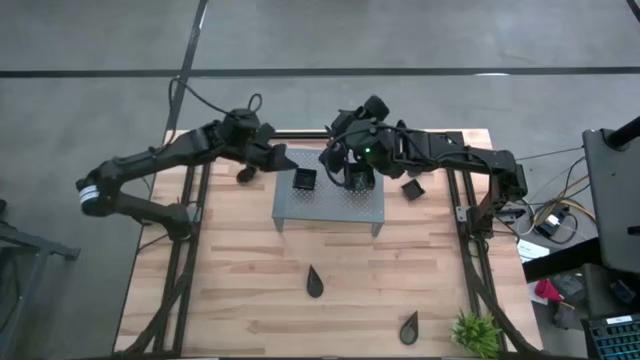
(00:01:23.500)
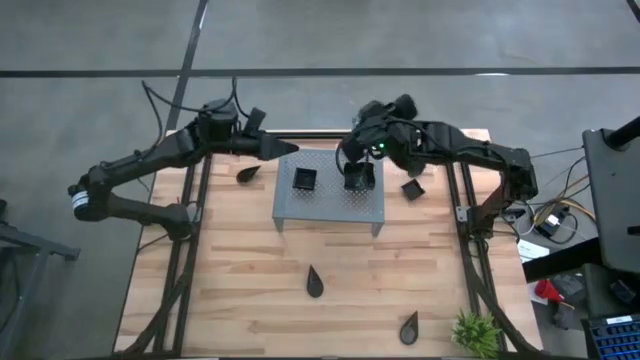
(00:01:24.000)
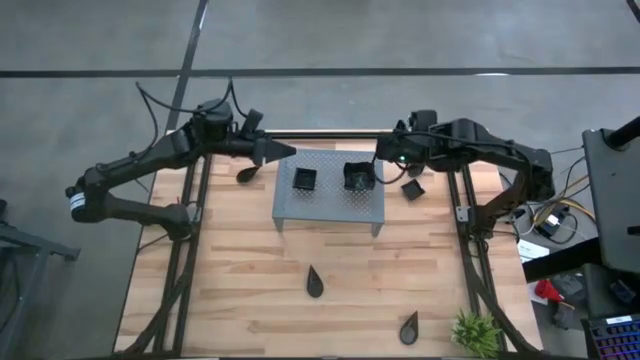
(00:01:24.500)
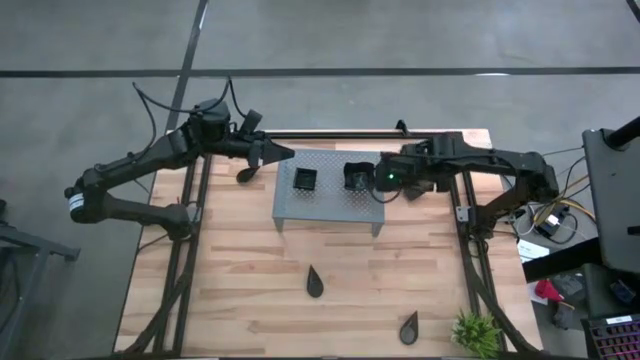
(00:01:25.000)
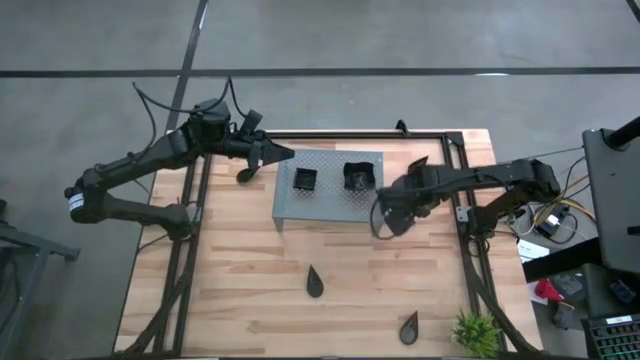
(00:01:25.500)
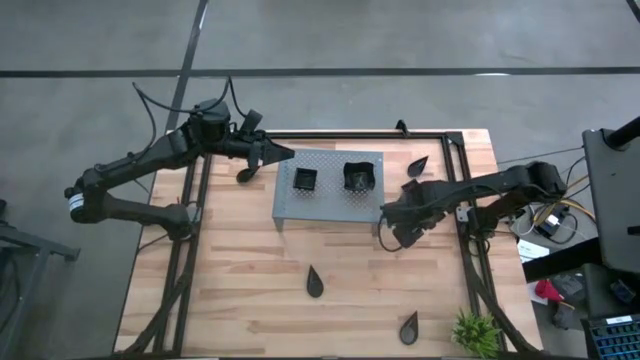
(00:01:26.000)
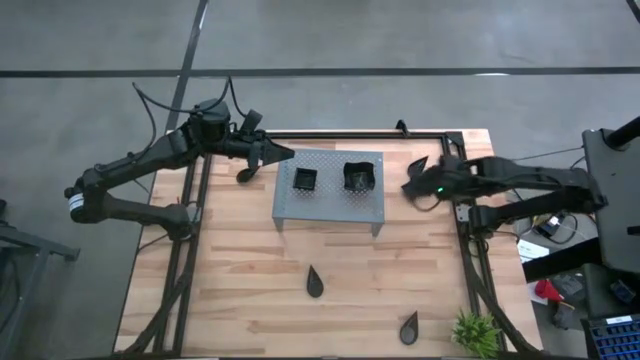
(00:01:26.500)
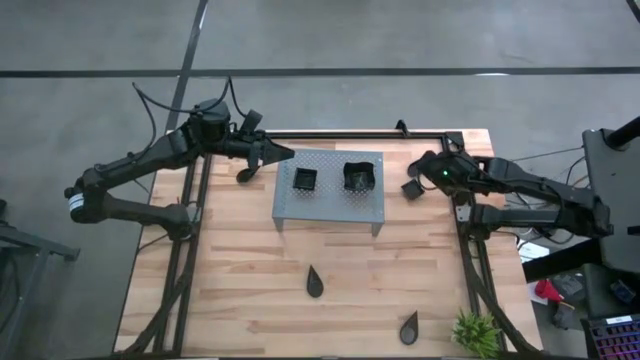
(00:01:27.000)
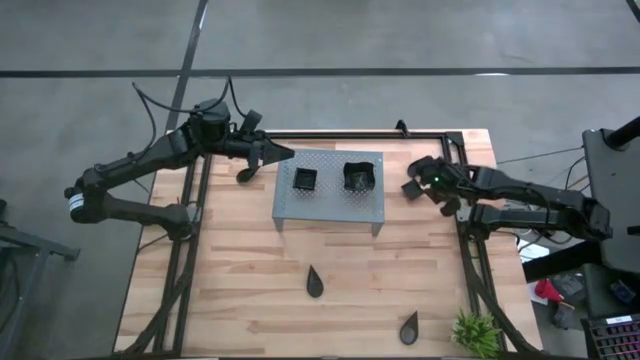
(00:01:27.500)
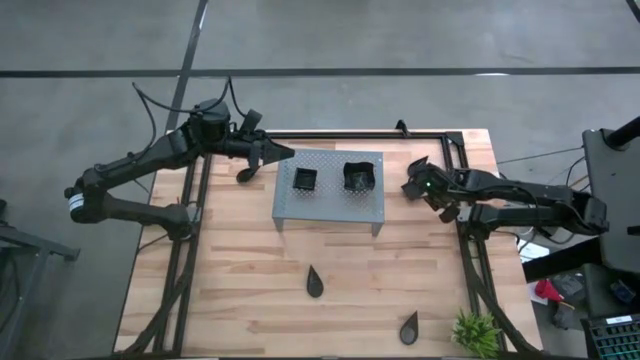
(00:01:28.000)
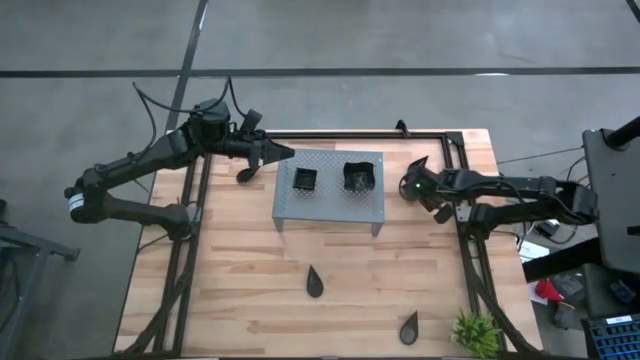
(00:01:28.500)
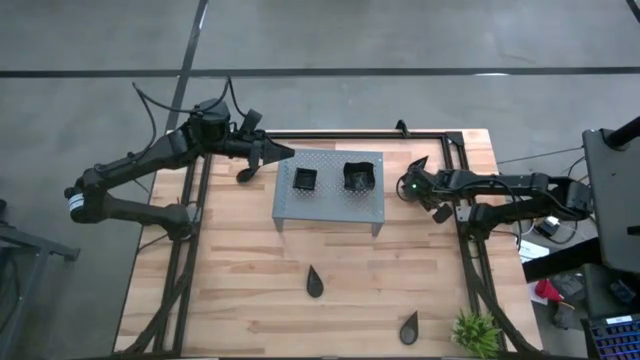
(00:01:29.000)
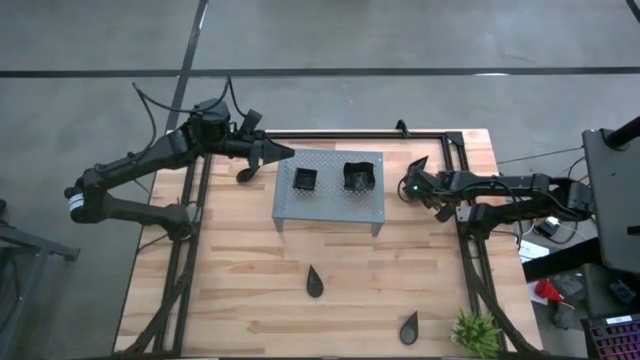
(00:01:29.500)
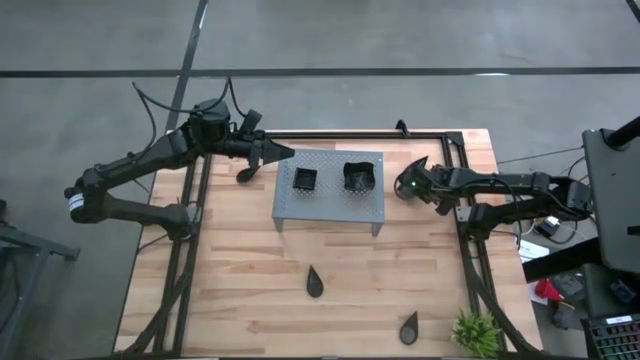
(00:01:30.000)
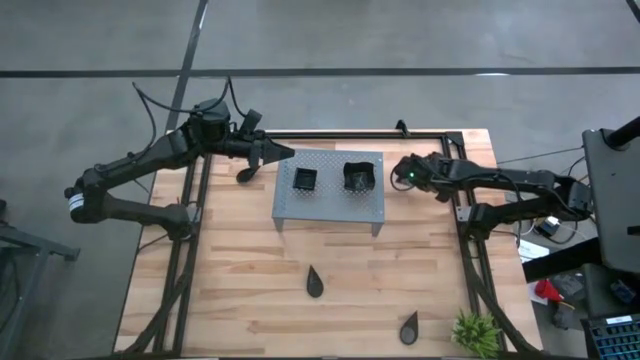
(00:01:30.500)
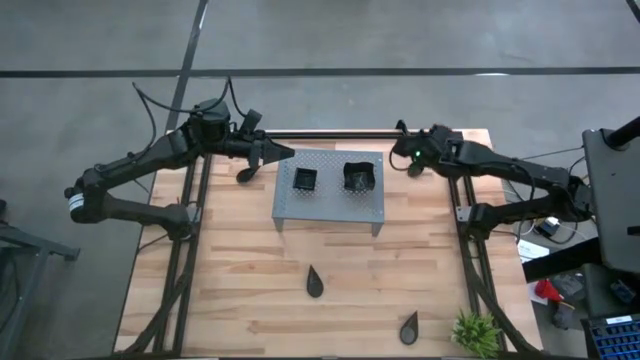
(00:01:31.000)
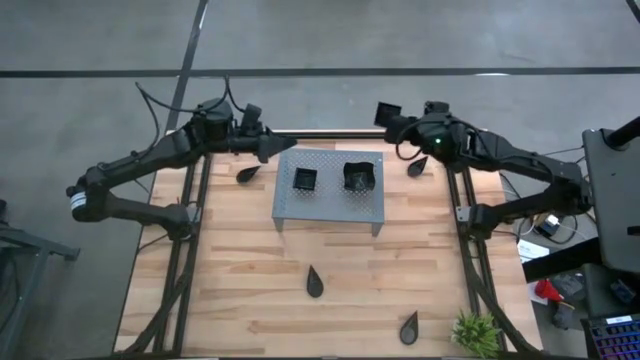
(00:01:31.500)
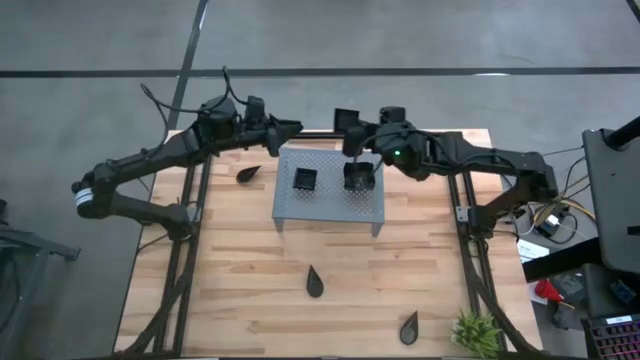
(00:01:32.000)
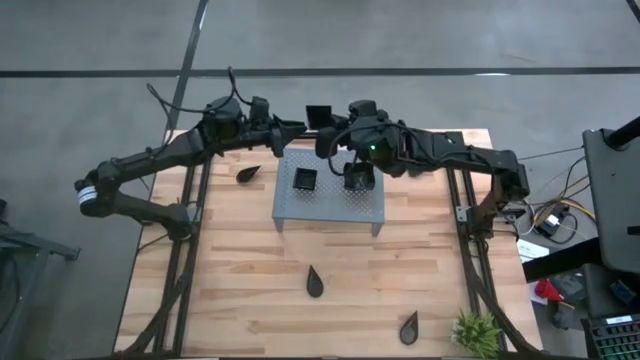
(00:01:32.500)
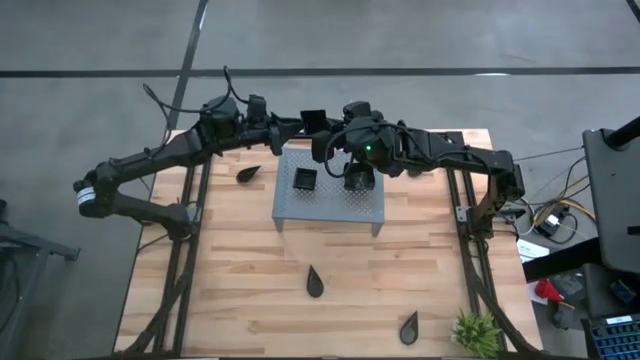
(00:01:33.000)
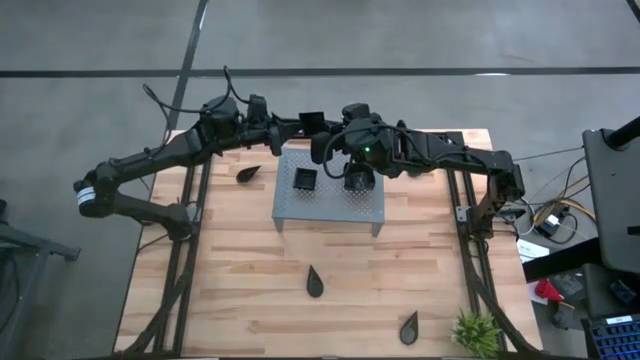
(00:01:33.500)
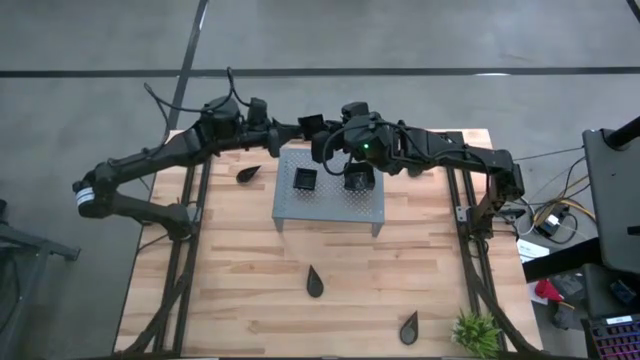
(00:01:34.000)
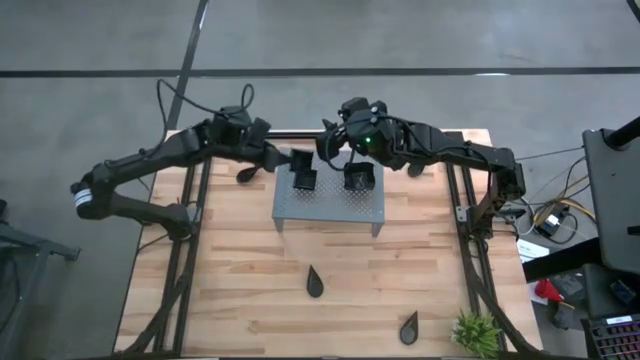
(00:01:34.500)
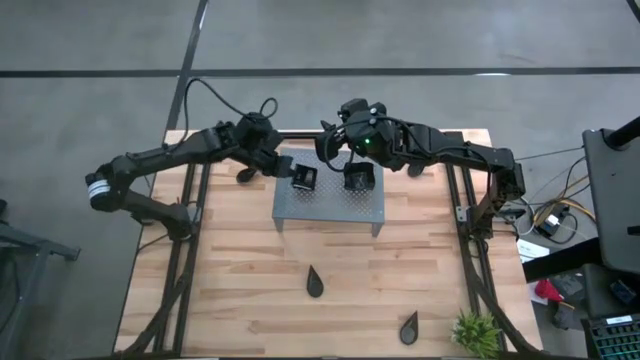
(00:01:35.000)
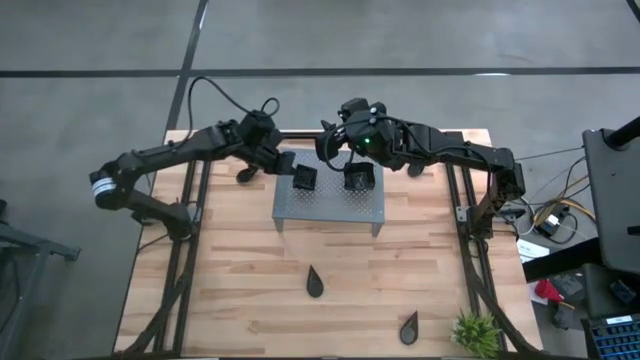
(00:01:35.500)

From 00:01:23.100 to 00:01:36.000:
Task: Pick & Place Mini shaped plates
Stack the black square plate on top of the other black square plates on the shelf

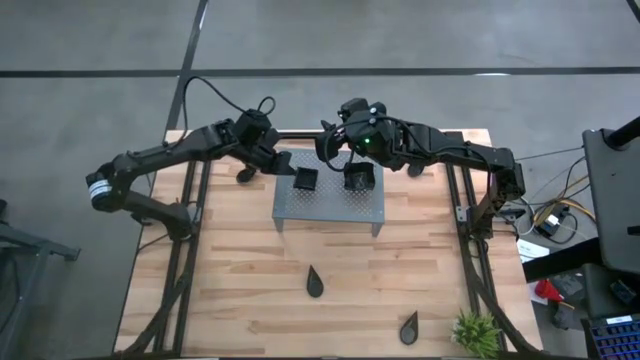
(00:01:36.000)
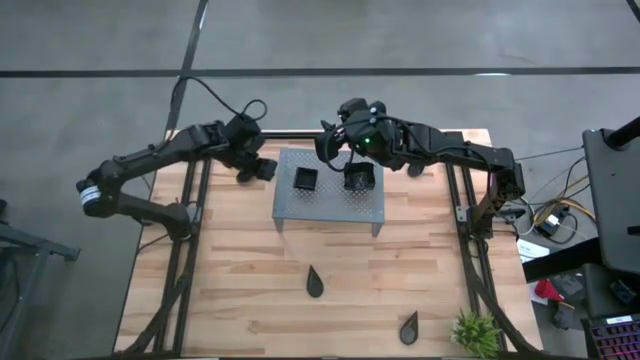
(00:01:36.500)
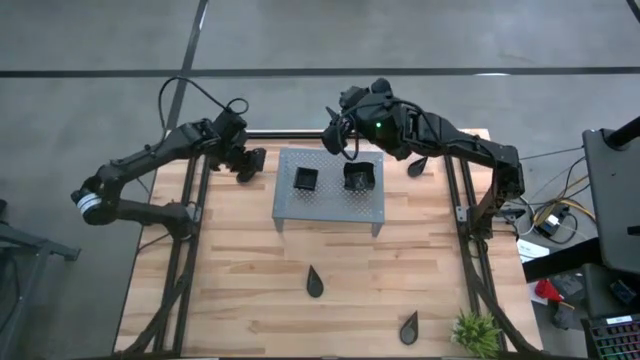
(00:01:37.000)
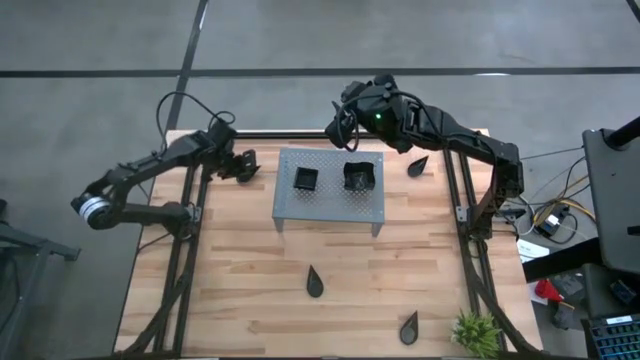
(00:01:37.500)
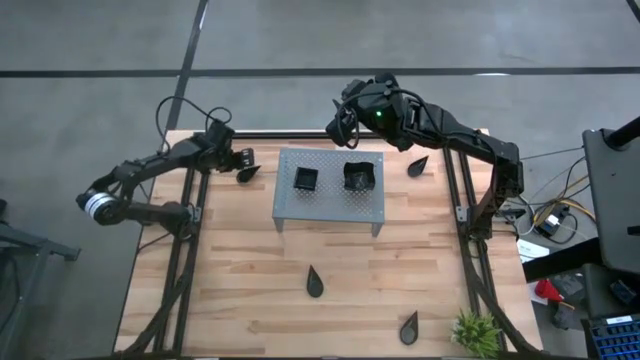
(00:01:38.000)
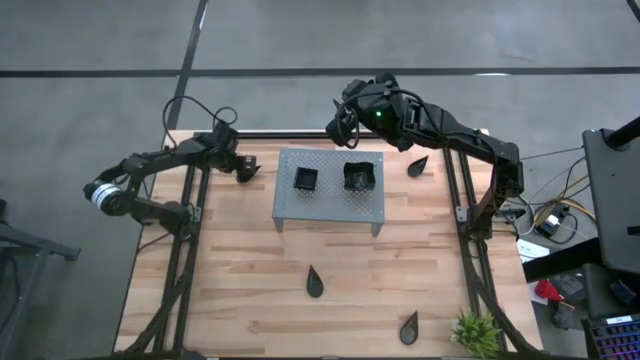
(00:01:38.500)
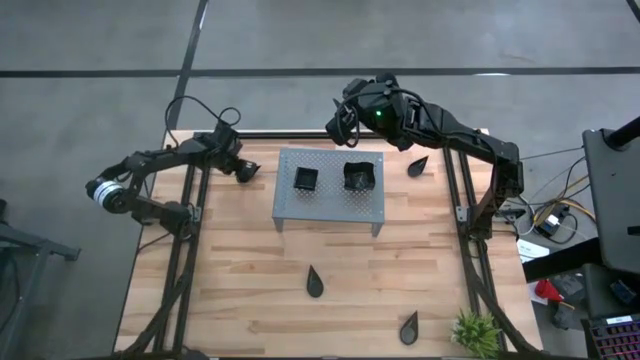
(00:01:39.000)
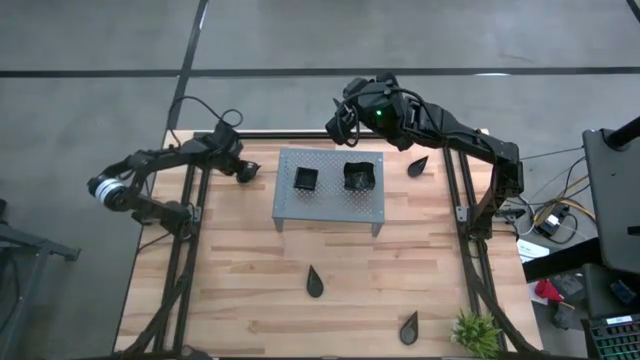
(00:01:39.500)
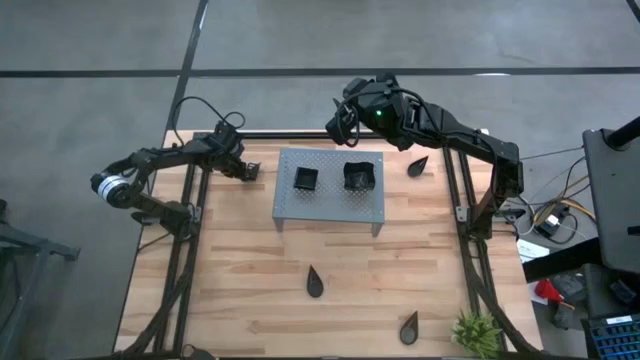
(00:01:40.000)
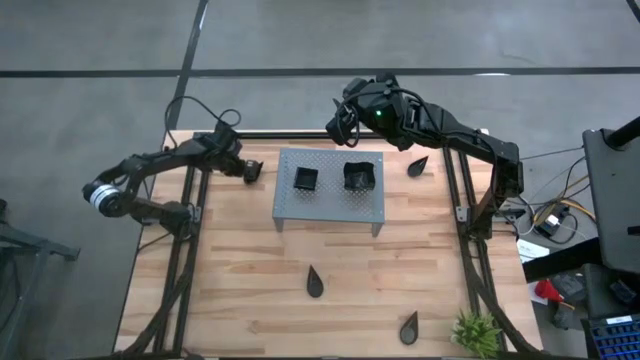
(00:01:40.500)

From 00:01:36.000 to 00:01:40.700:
Put the black drop shaped plate on the shelf

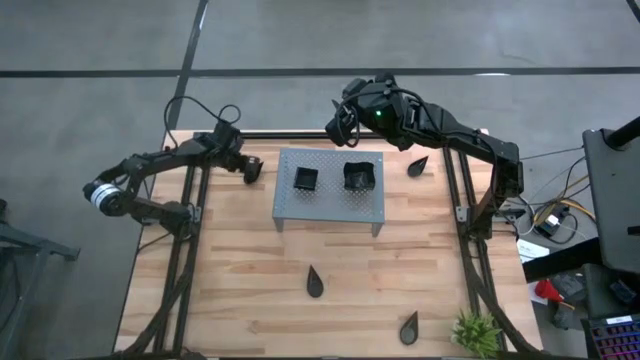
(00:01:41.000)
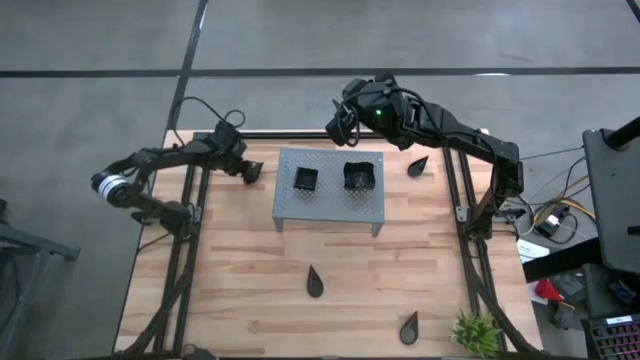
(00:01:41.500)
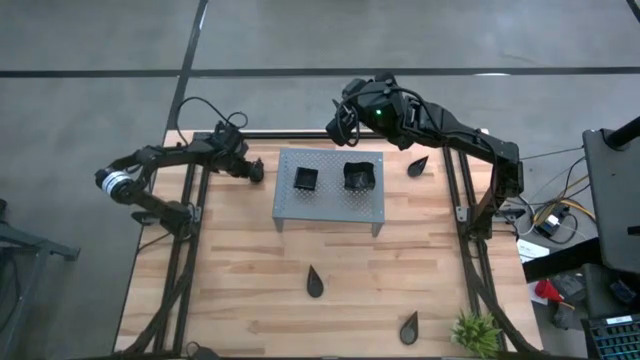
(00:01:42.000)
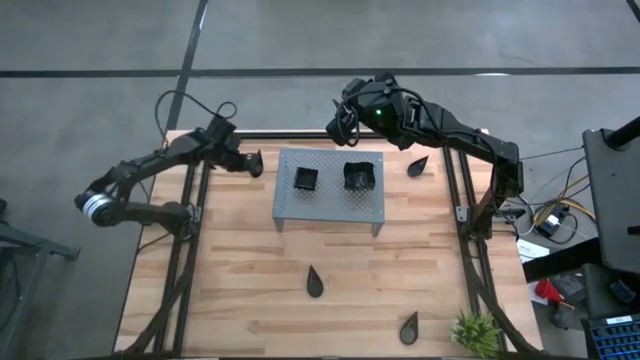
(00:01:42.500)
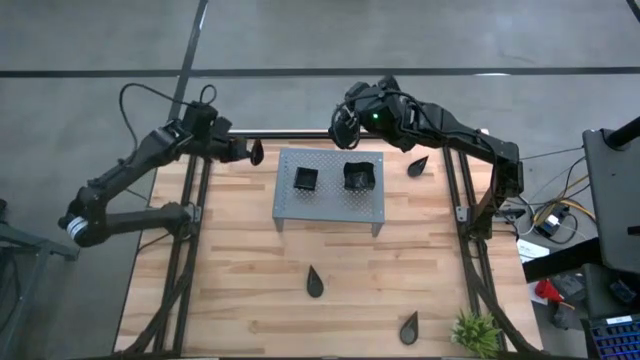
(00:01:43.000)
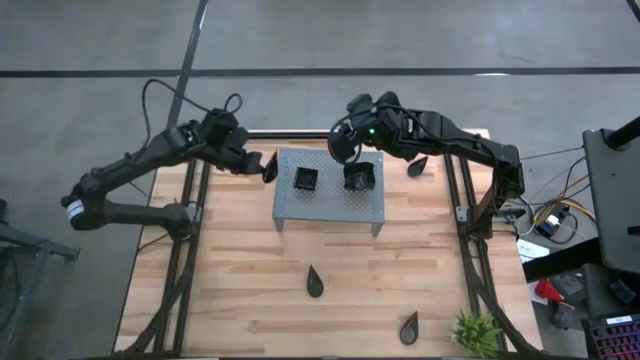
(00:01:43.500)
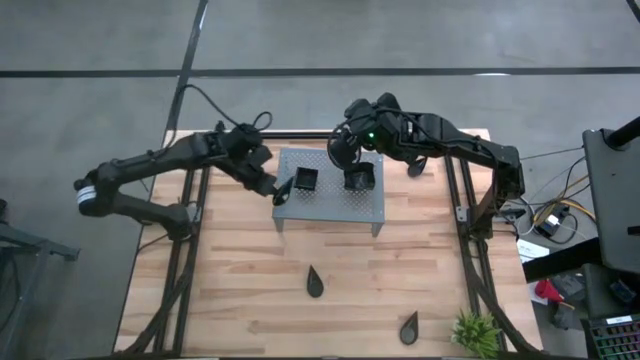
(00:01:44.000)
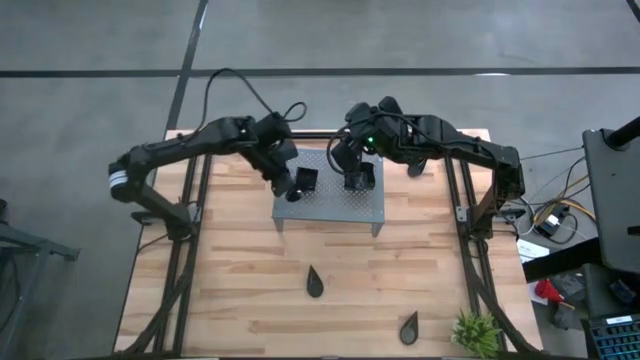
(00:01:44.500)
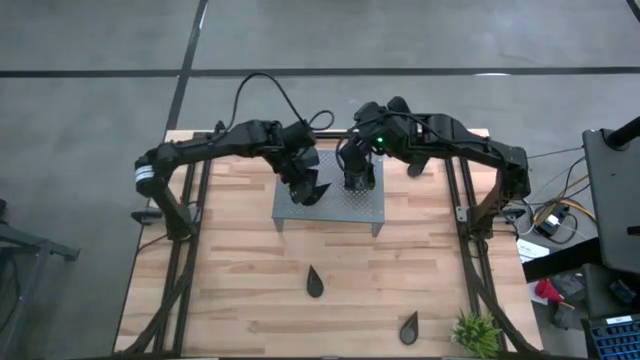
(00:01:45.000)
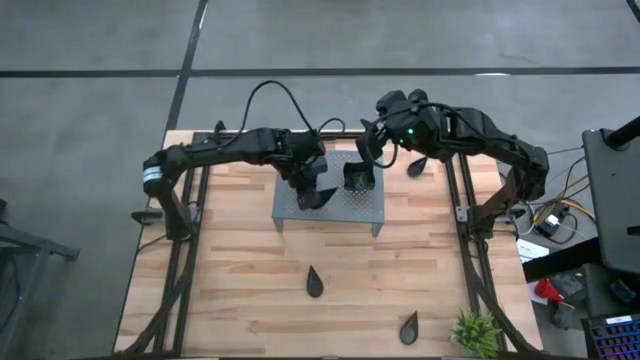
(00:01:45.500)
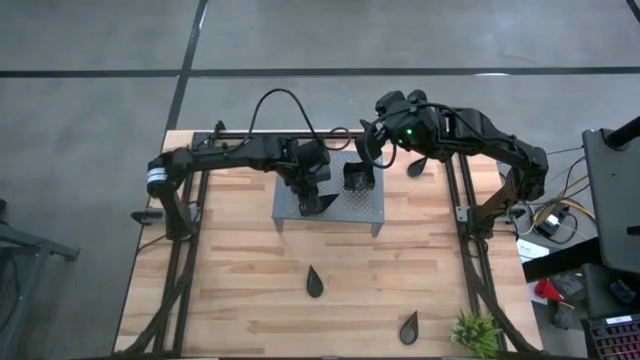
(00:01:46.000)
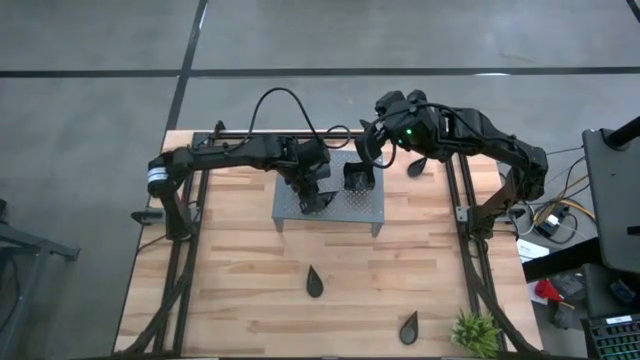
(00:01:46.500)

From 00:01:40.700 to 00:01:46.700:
Put the black drop shaped plate on the shelf
